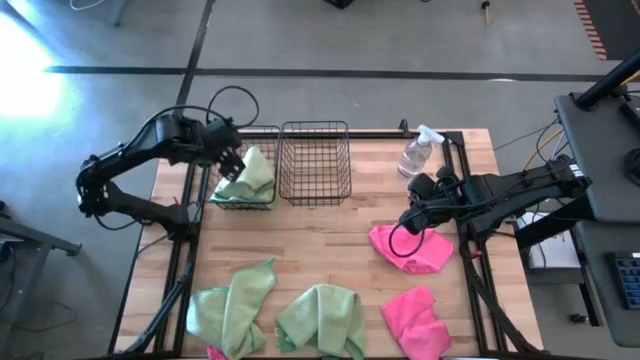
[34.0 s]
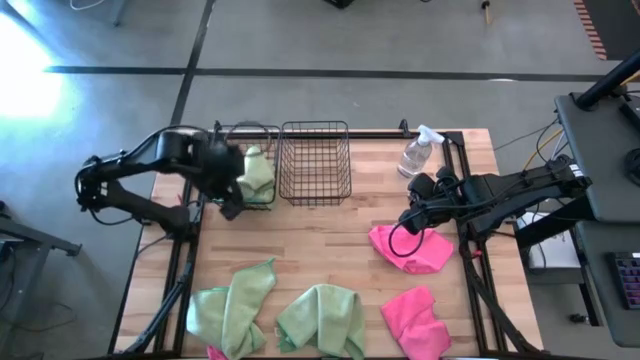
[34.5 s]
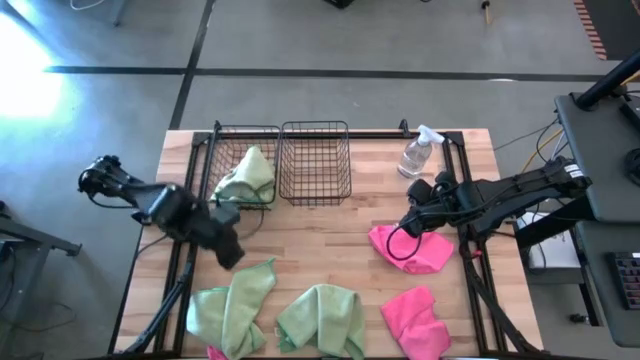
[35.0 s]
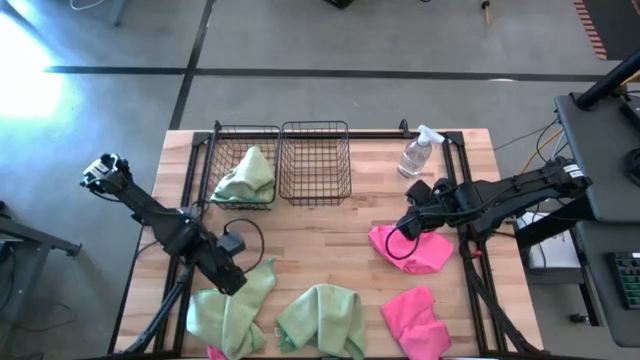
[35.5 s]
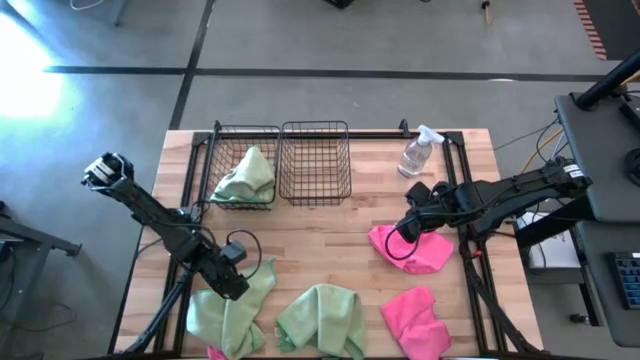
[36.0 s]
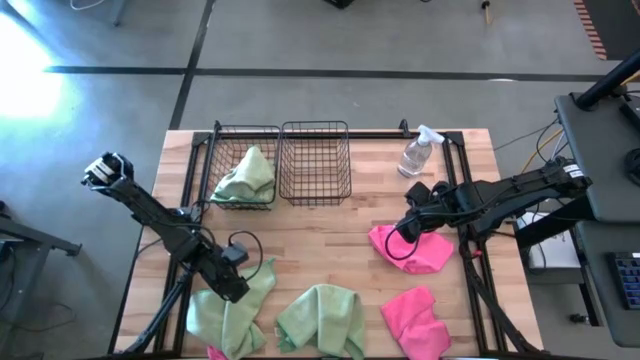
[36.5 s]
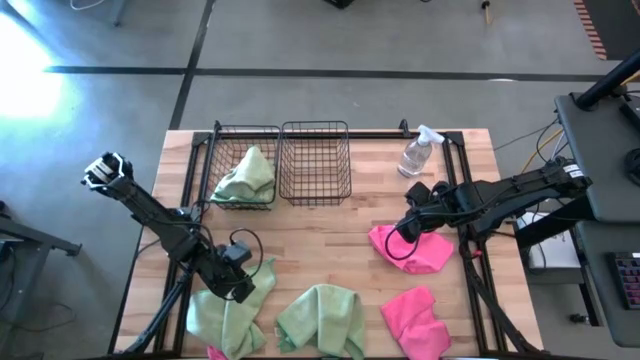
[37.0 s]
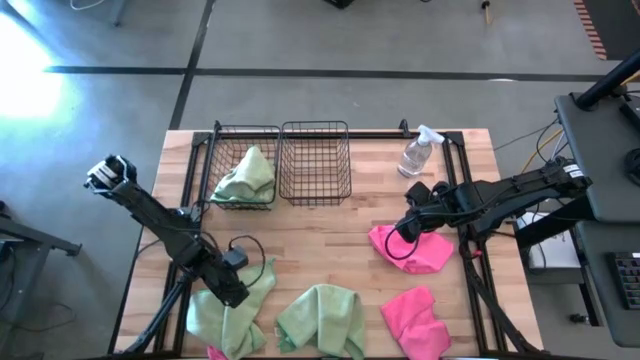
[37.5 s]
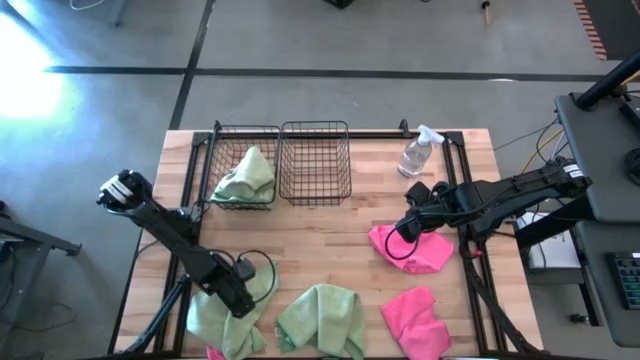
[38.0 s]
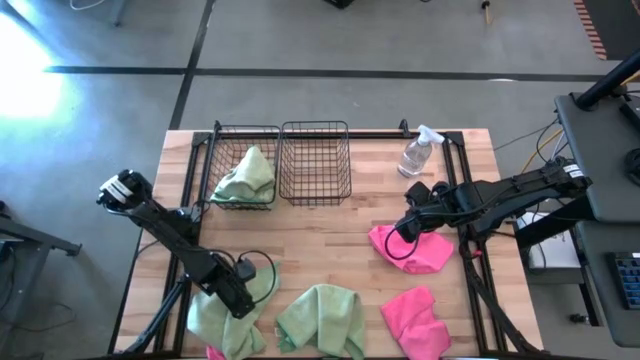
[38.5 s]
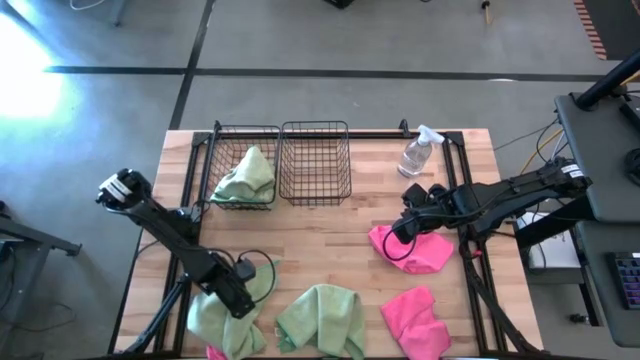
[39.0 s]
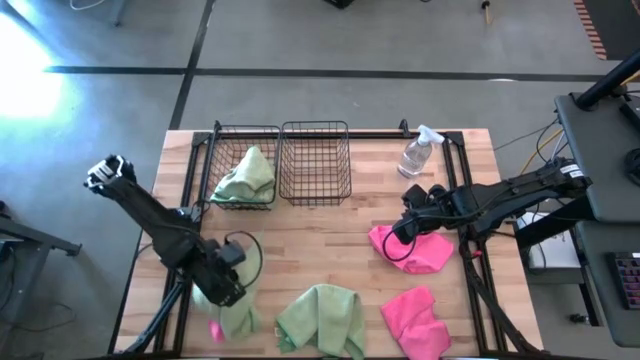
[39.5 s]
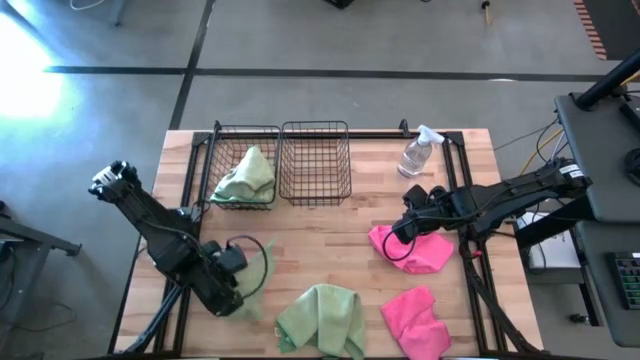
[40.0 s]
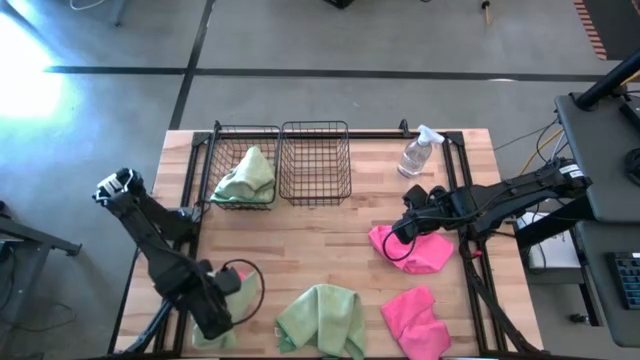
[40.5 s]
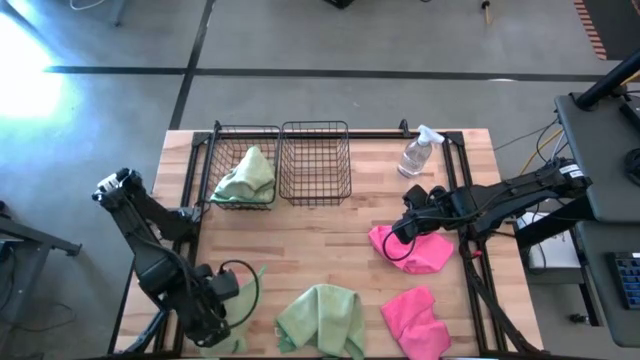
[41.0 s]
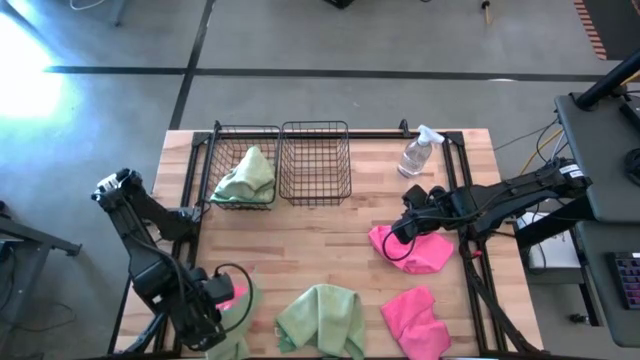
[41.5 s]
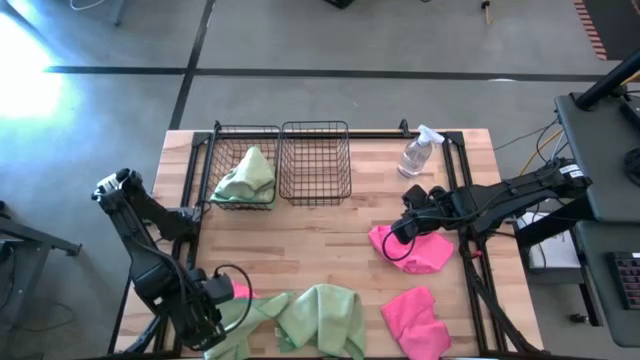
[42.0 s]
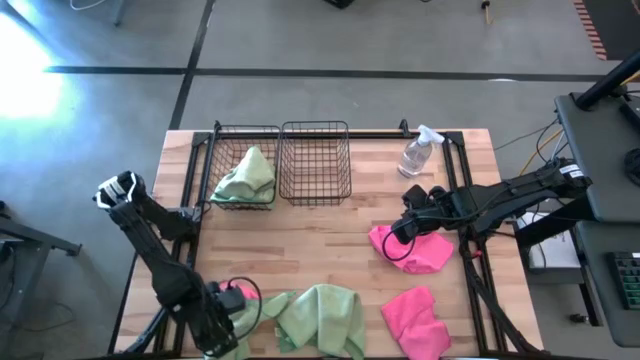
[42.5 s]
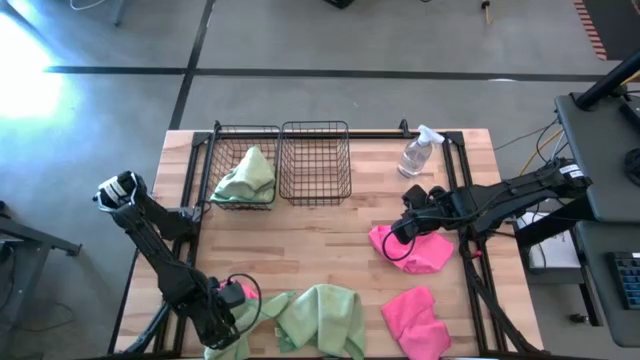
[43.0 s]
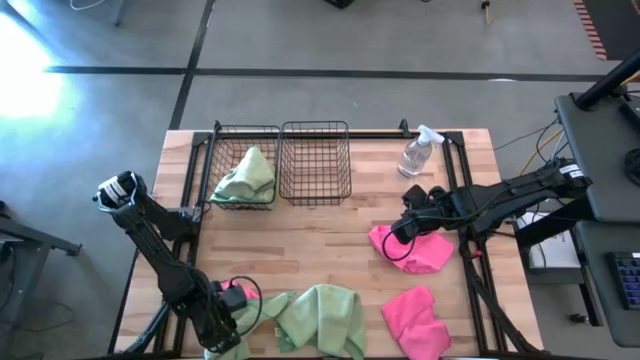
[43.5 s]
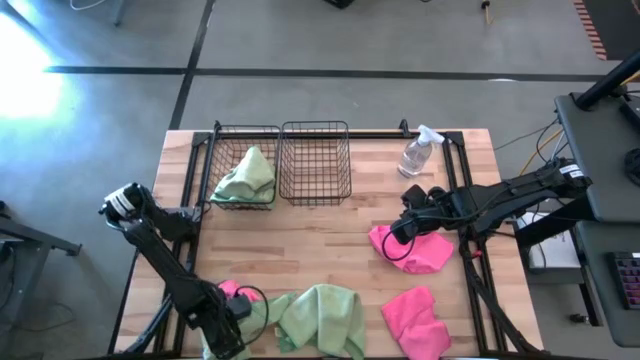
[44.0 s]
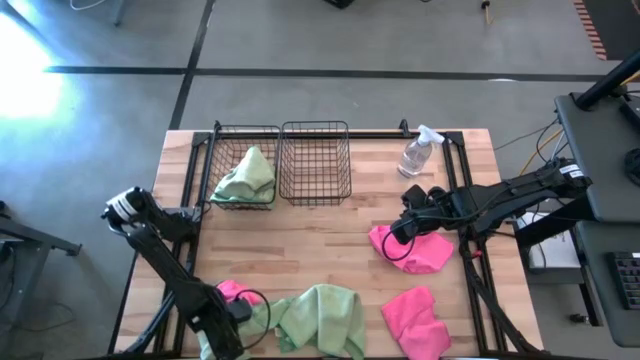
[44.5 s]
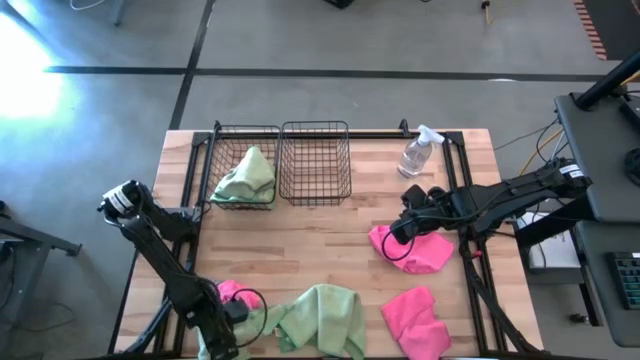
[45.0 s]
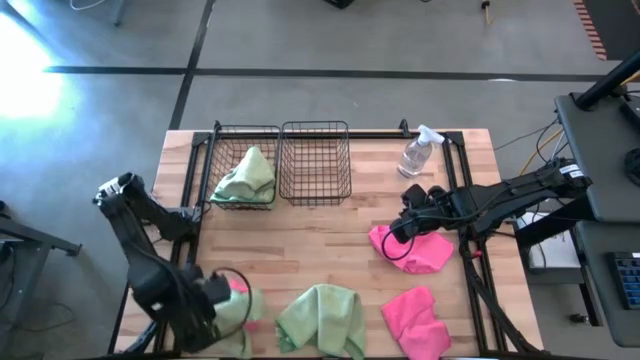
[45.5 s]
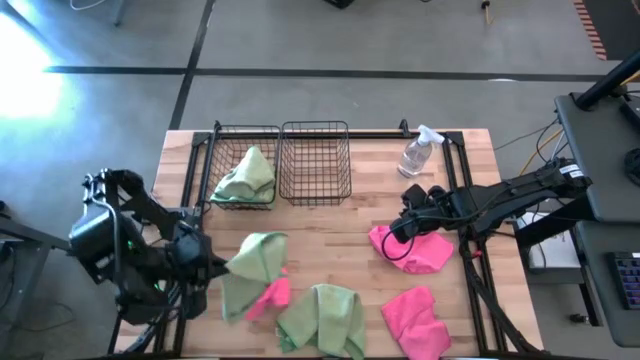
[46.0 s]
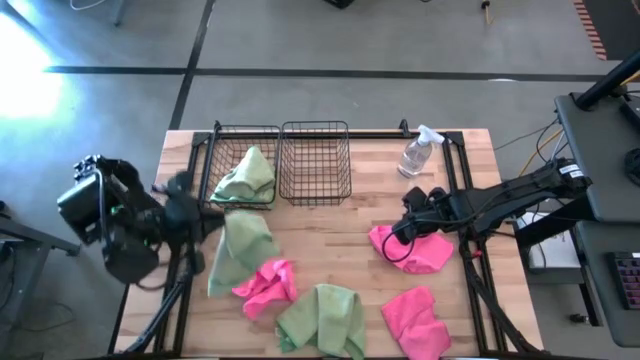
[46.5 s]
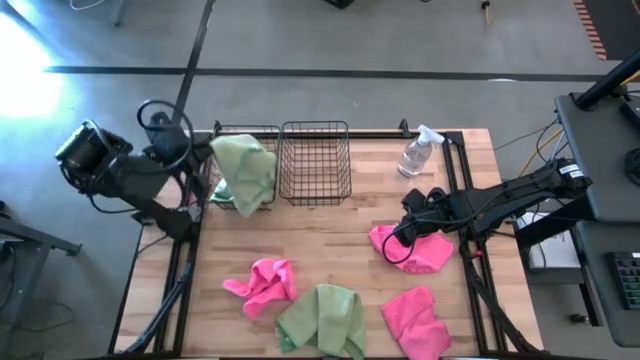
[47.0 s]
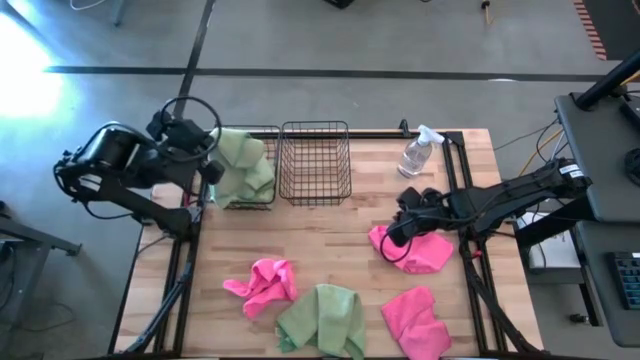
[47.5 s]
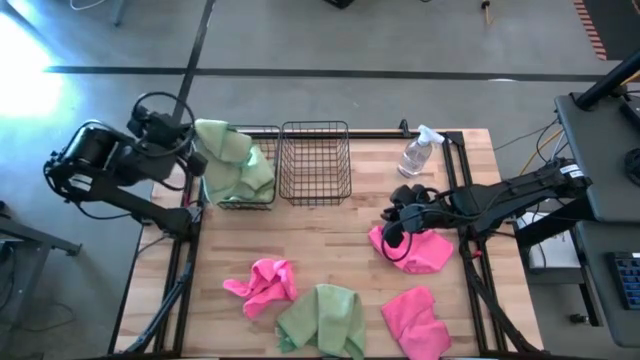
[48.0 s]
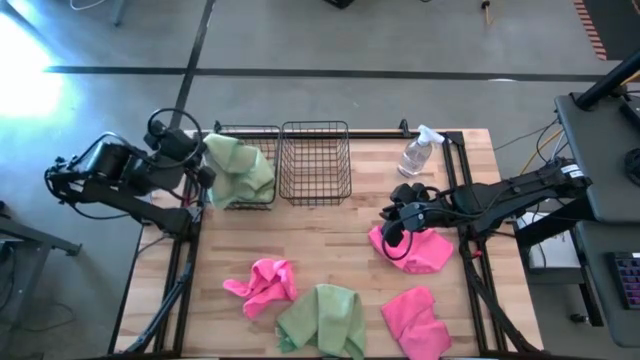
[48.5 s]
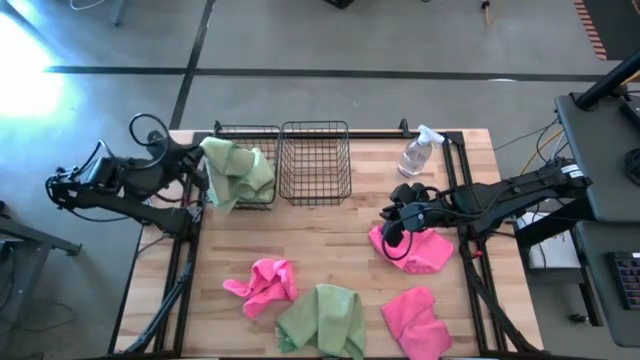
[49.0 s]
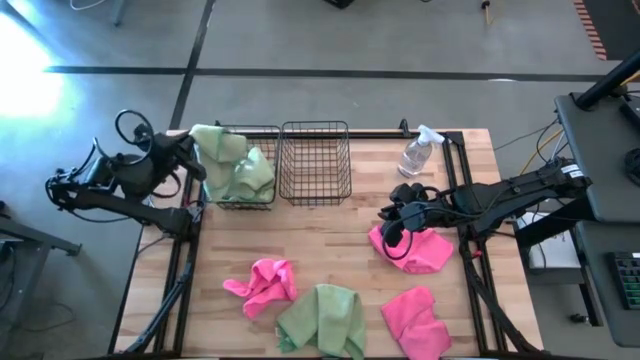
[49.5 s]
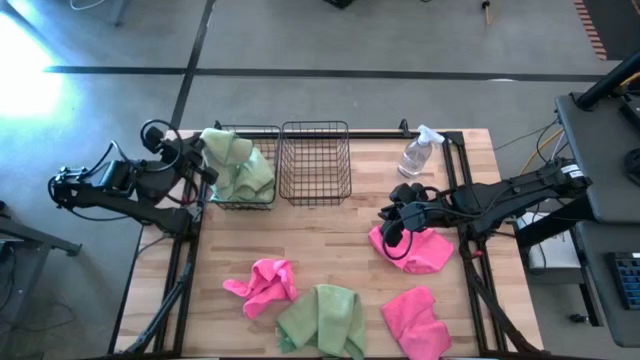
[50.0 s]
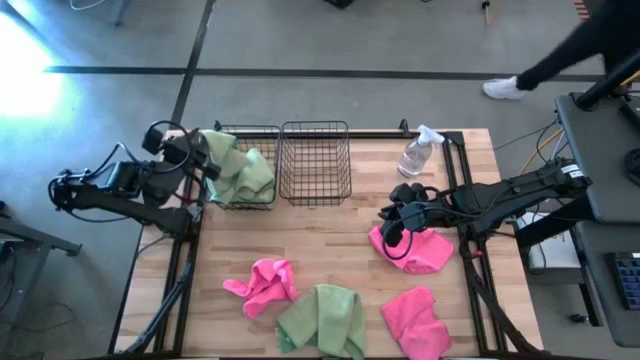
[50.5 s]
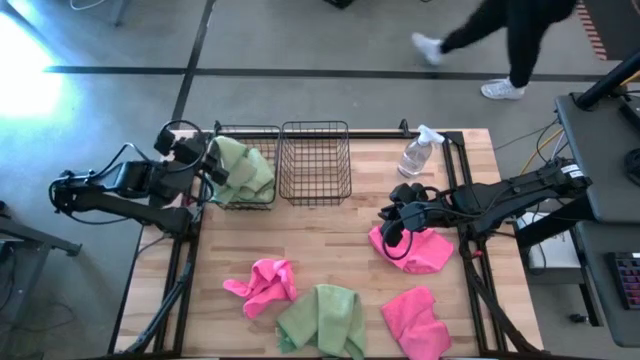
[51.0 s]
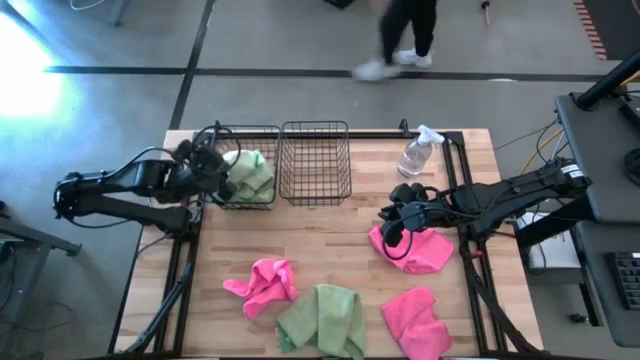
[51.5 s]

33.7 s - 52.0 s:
Task: Sort microfiber towel by color & place in baskets
Put the green microfiber cloth into the left wire basket

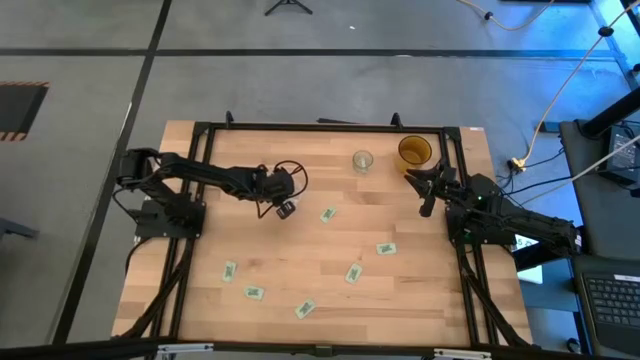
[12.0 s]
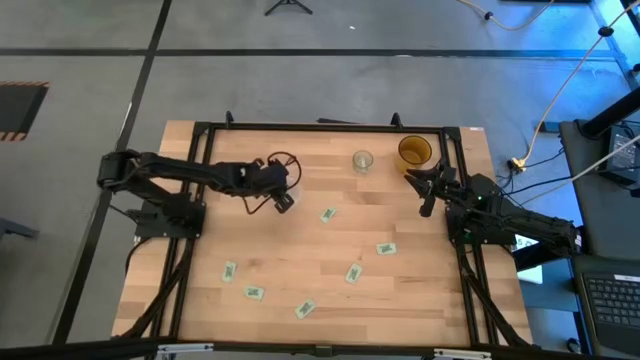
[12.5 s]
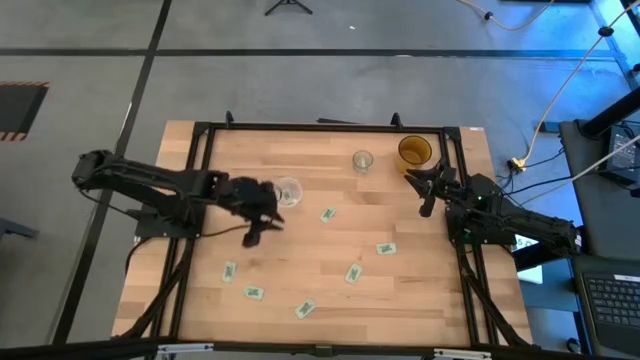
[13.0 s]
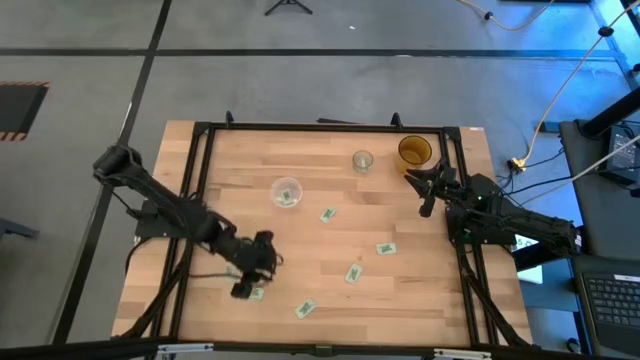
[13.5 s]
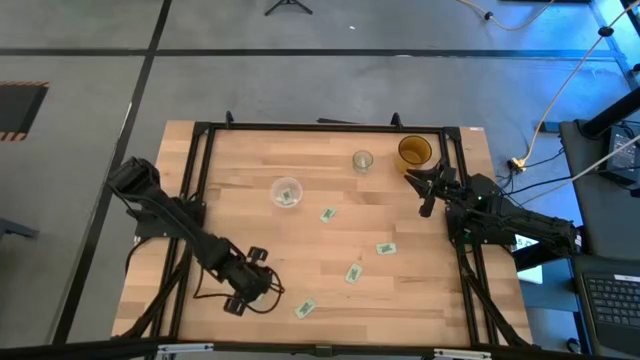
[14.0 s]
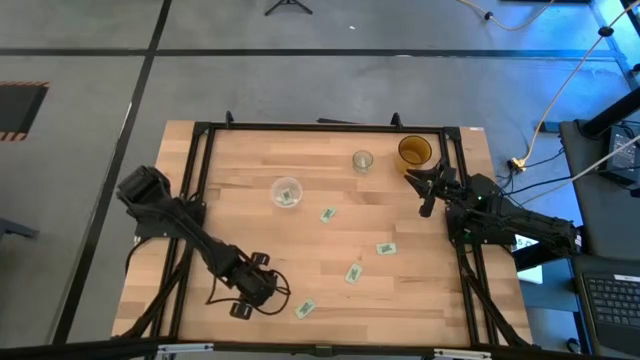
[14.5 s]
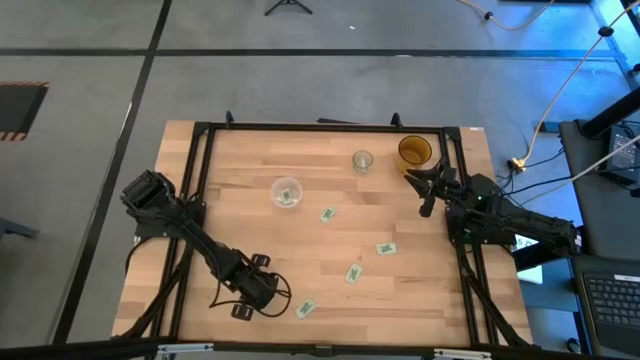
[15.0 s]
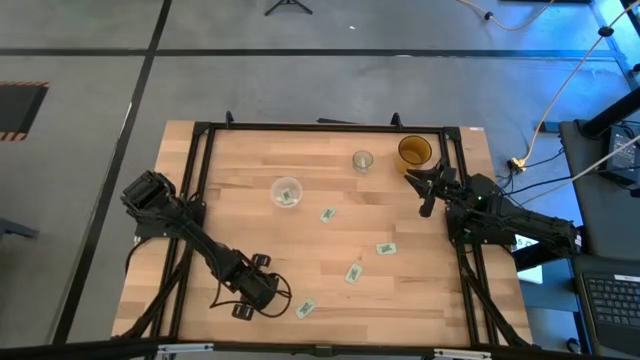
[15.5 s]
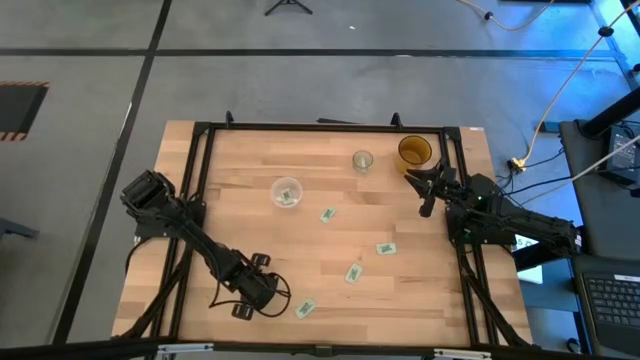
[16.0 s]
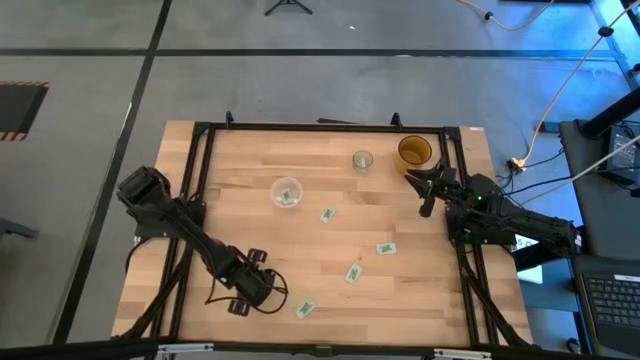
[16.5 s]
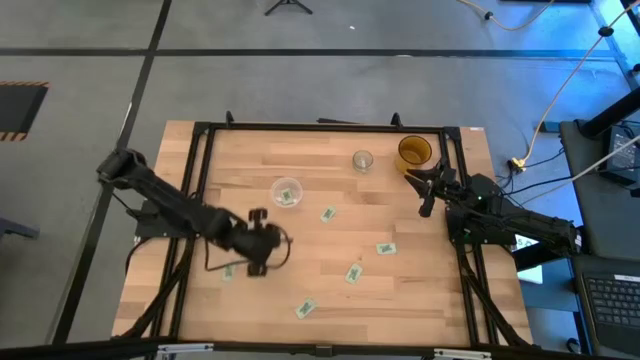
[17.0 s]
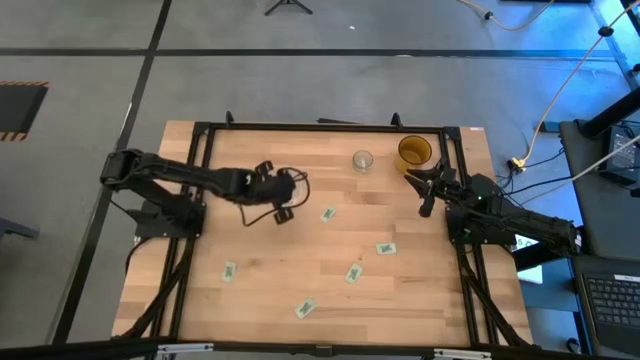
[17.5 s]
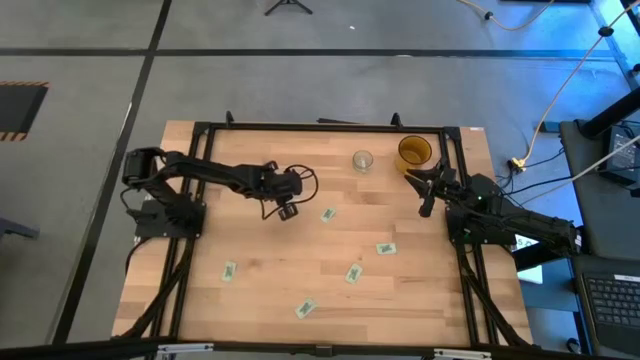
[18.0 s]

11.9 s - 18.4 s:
Task: Pick and place Stevia / Truvia into bins
Put the stevia packet into the transparent container
